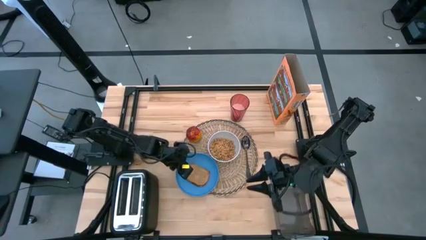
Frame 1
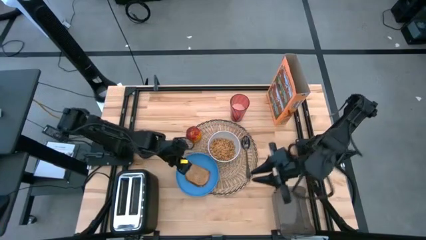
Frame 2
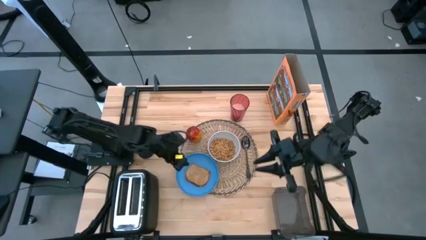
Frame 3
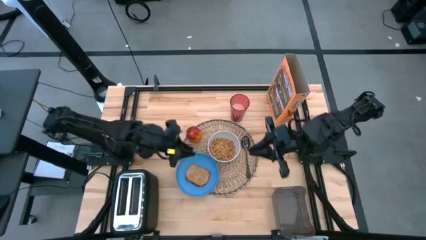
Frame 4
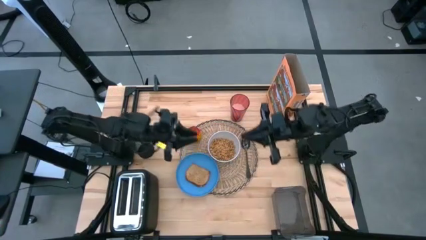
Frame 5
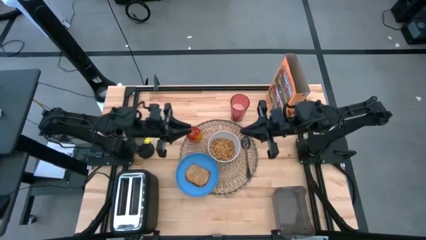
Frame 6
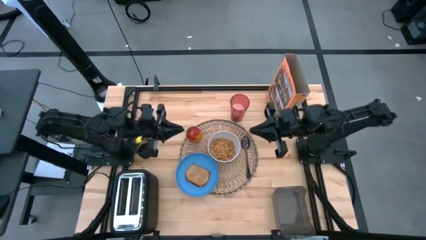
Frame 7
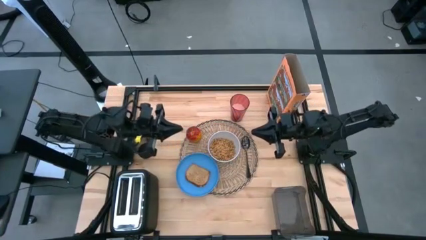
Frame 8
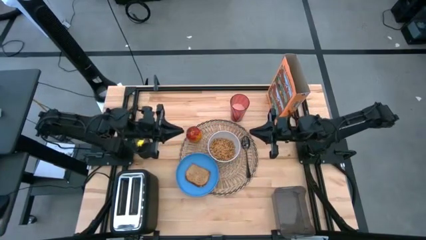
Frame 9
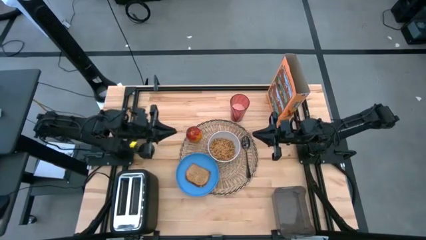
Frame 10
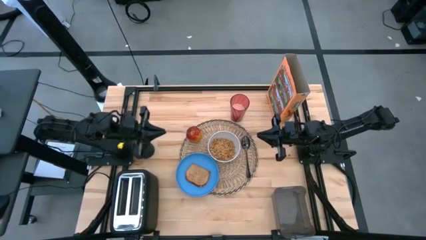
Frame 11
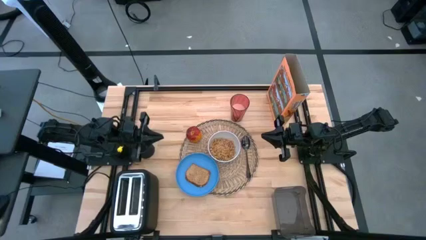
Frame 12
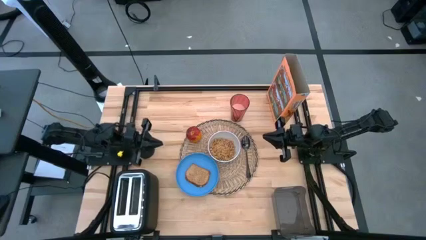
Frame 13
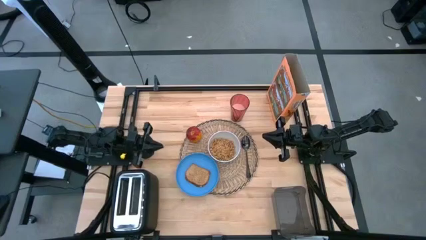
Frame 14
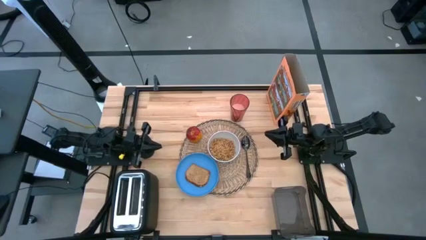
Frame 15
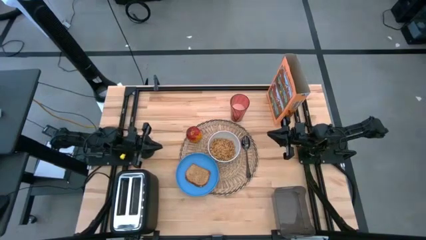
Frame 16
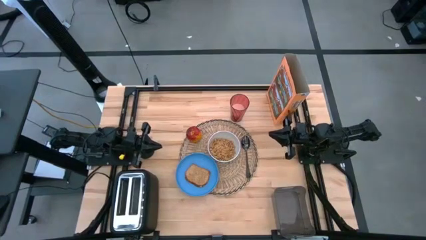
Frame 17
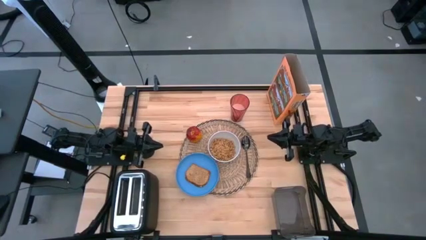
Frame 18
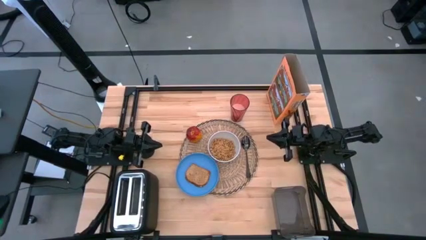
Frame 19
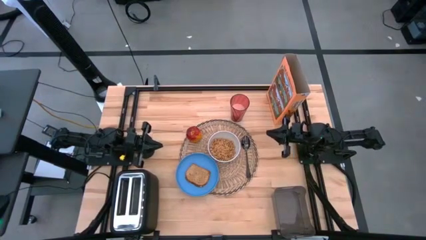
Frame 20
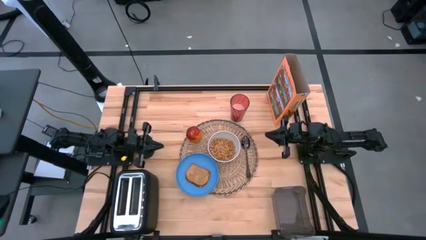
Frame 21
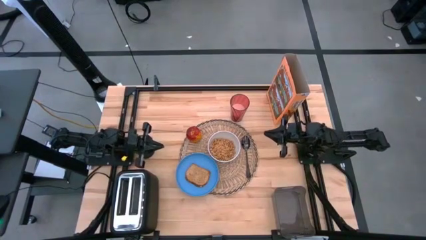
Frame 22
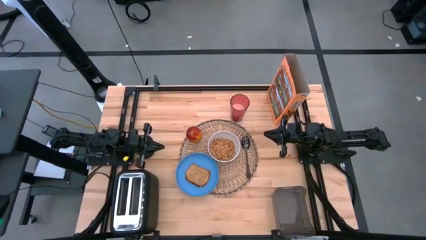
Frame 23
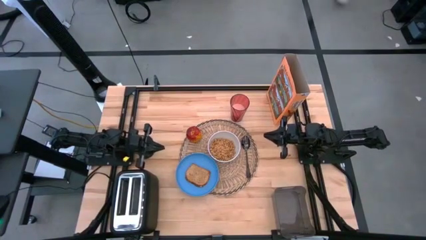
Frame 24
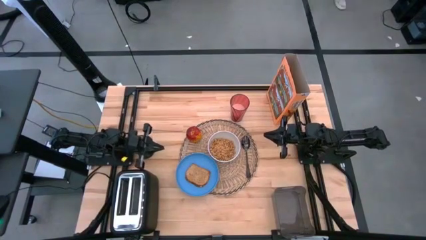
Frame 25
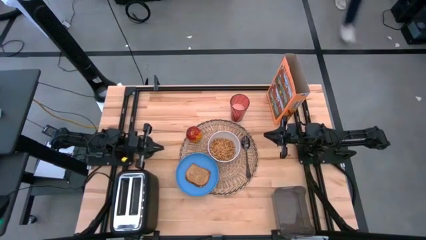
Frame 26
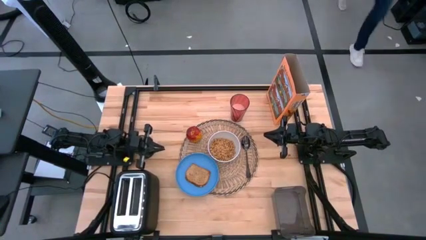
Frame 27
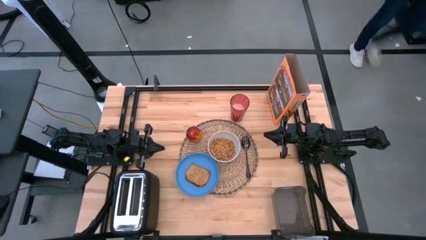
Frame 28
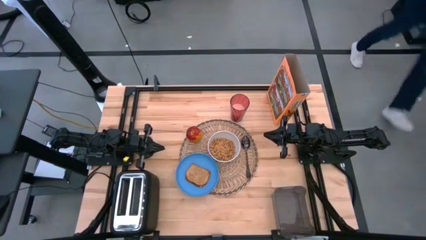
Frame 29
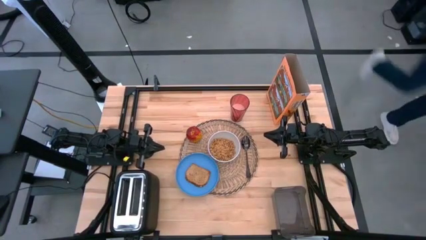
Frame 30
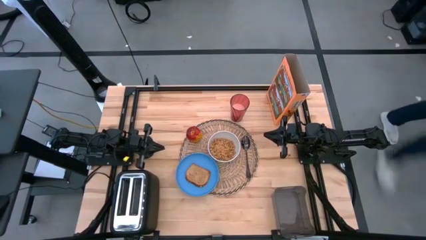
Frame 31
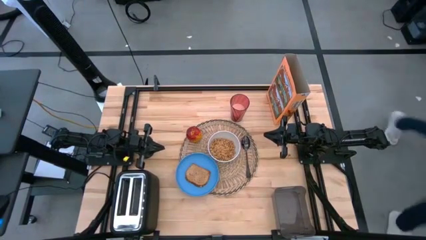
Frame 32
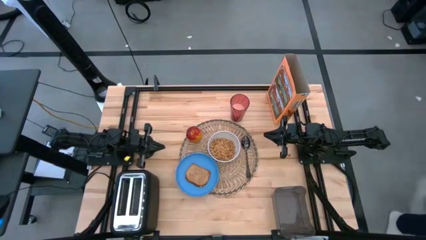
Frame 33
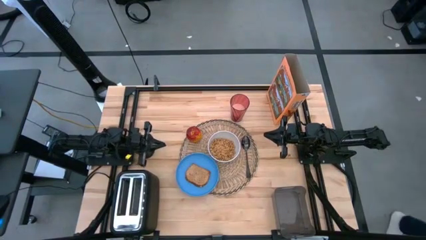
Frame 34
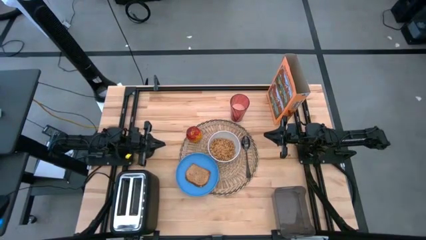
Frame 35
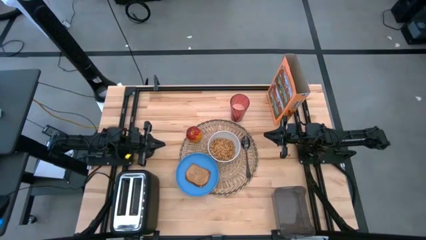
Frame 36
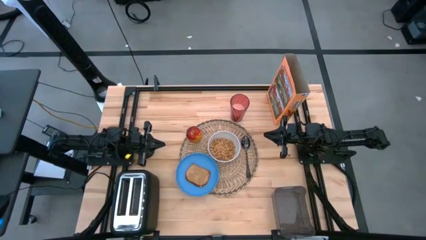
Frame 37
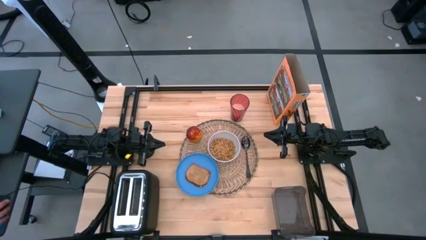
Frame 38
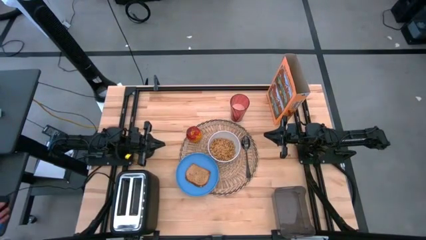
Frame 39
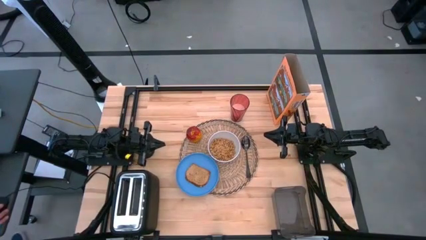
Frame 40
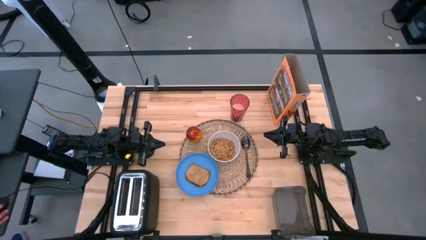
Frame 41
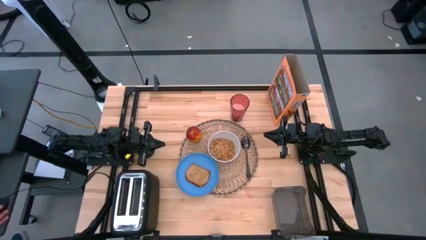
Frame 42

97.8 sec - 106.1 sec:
Task: Arrange a breakfast setting
Return to Home Position

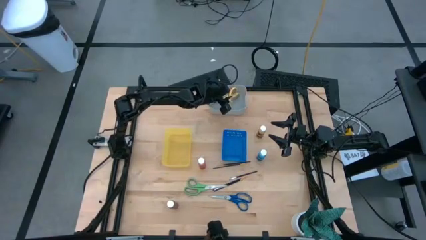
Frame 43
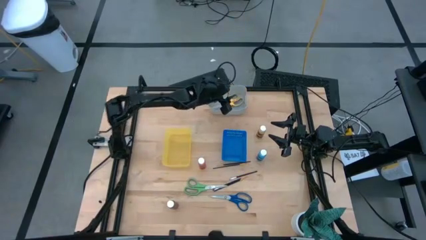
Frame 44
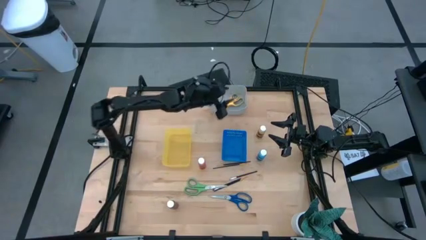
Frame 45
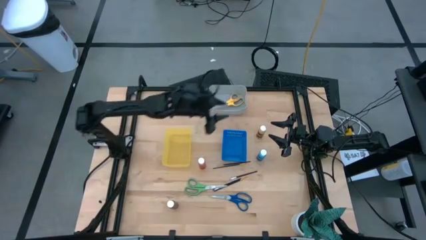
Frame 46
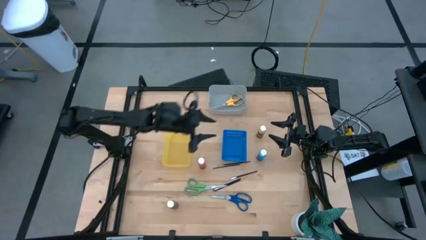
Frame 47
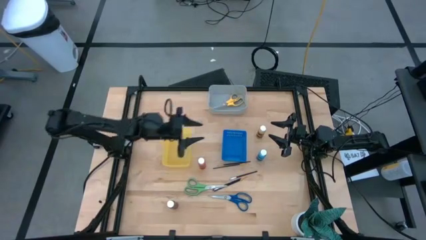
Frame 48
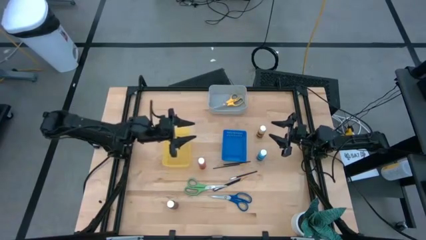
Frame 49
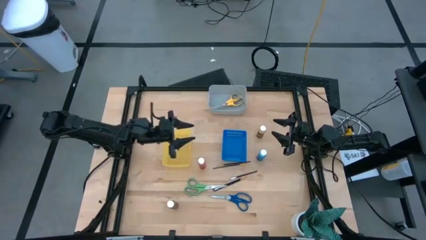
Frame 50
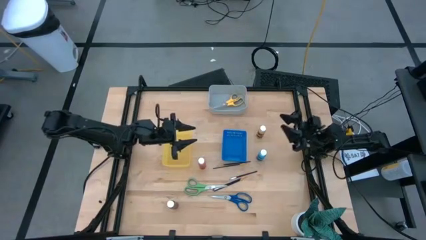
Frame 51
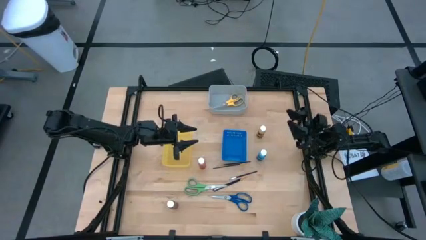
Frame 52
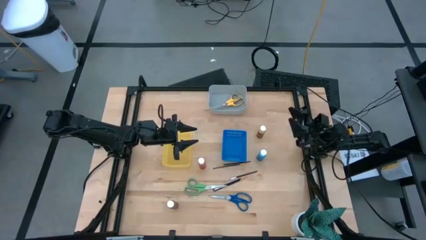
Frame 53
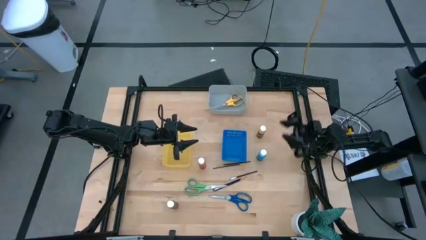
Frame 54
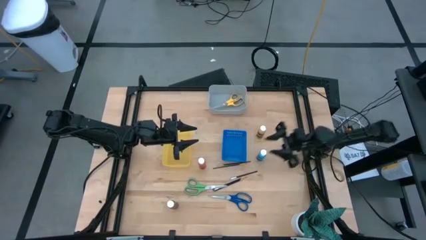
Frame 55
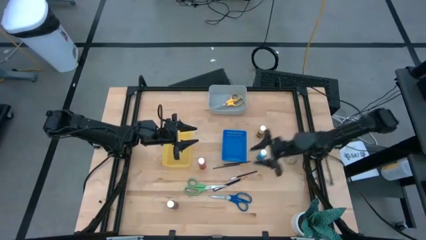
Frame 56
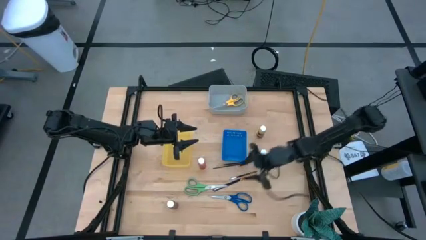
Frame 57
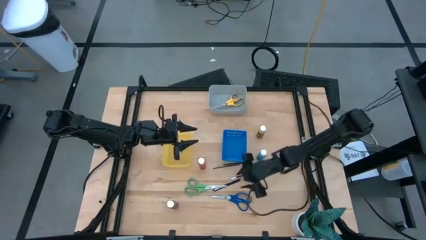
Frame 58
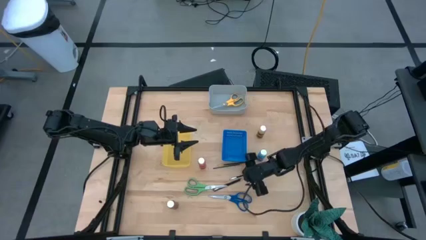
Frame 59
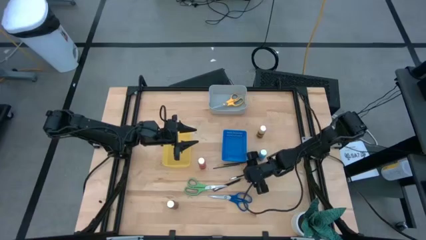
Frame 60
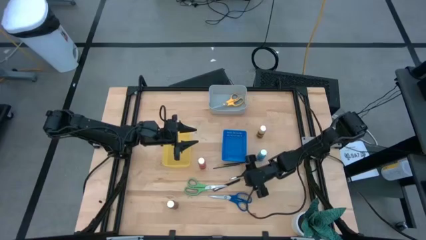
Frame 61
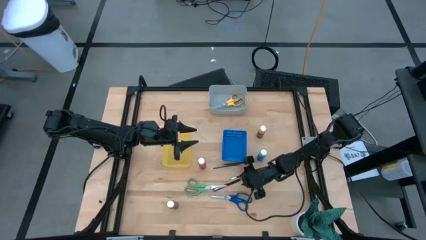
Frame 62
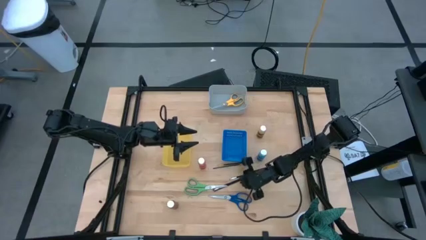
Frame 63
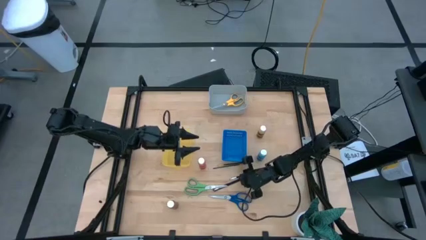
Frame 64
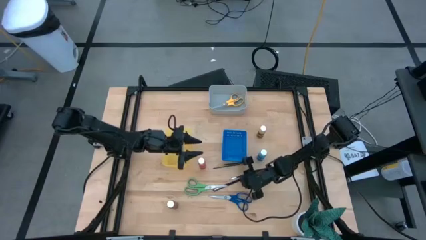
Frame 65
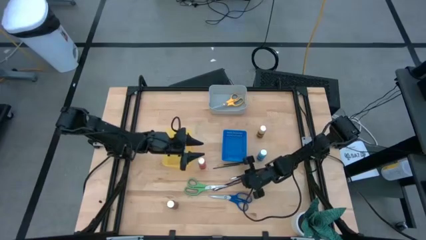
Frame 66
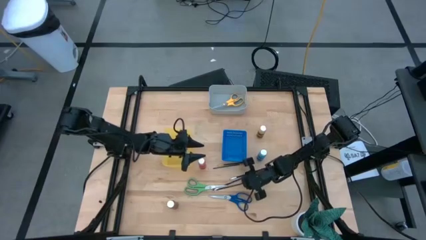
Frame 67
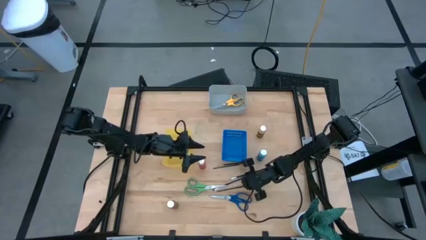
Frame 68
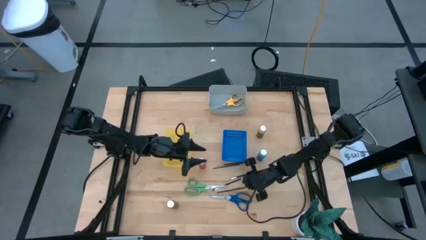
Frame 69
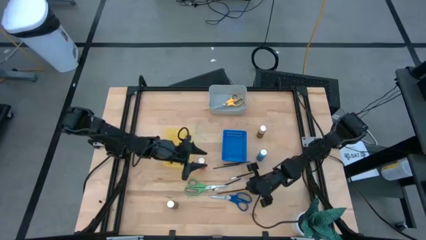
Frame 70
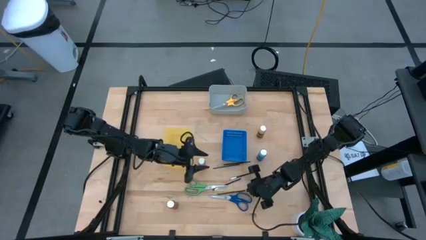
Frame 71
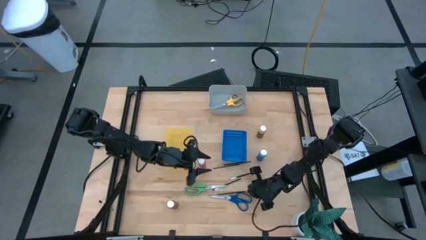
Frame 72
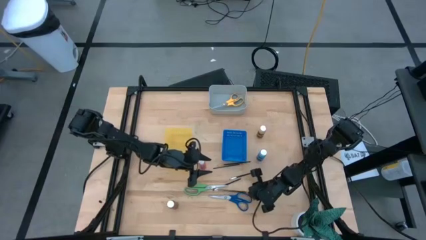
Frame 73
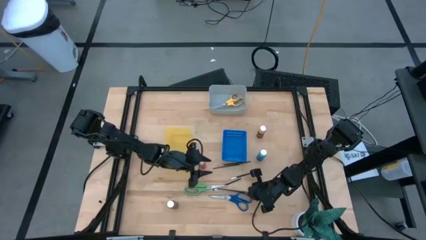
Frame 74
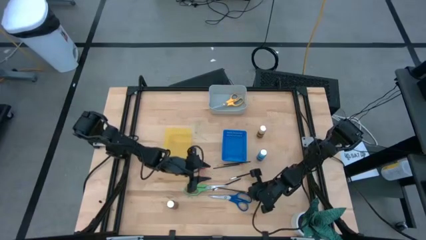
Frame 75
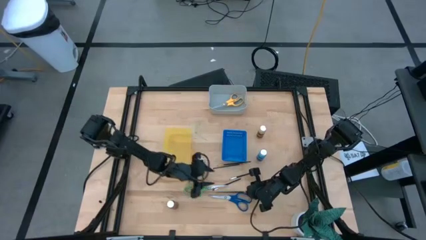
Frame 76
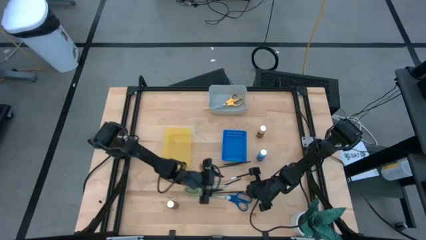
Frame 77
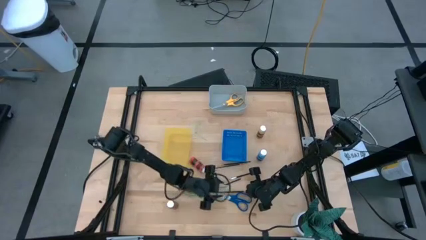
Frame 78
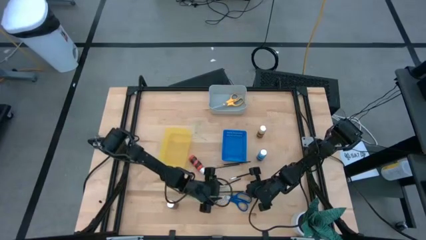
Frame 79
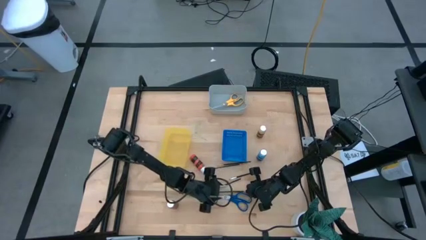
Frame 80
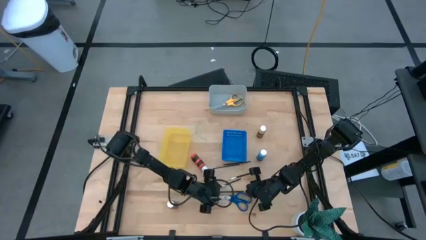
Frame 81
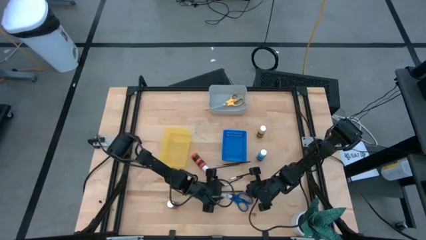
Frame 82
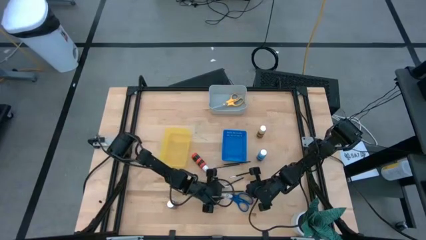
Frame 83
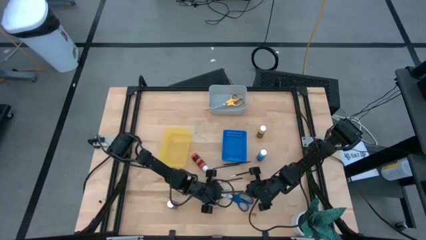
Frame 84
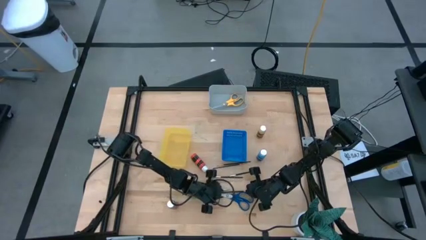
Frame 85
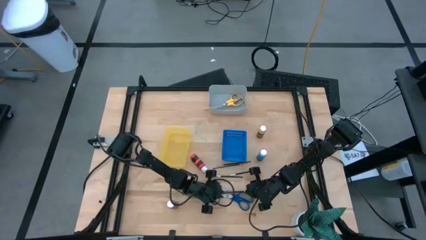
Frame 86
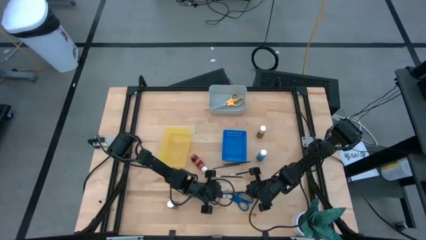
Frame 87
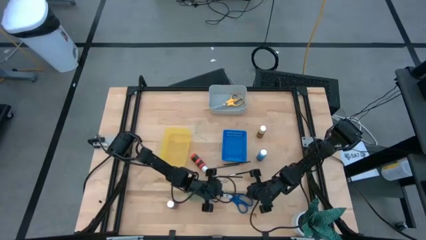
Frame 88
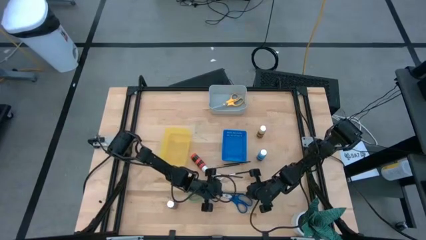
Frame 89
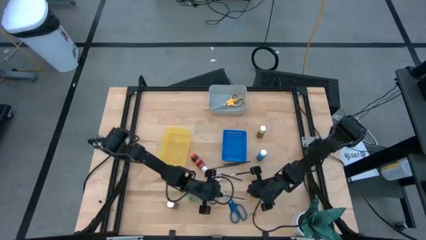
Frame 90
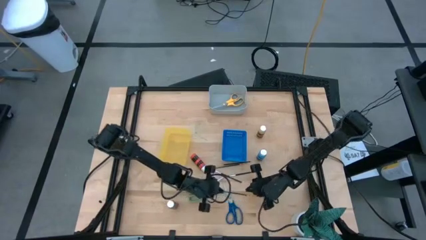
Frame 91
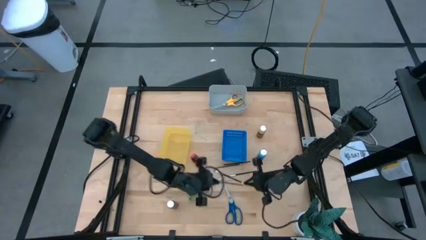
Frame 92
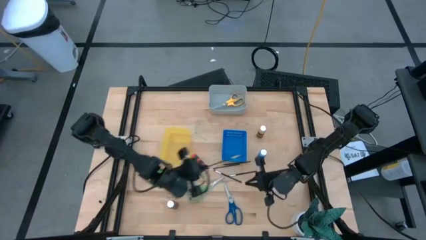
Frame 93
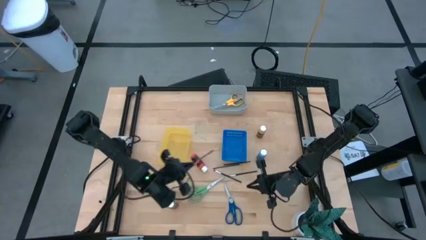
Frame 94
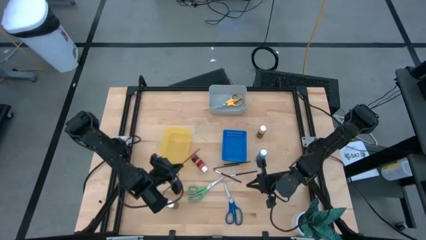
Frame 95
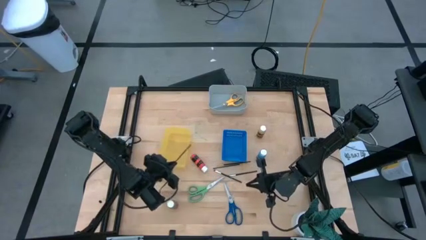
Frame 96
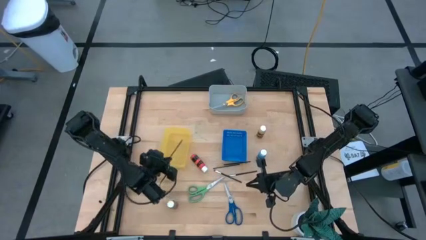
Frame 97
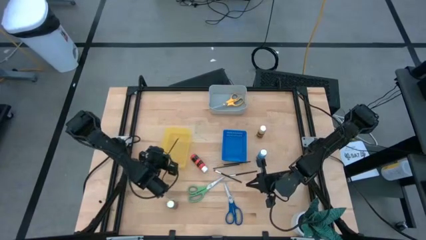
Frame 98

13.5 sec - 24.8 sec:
Task: Pick & Place Paint Supplies
Put the bottom gold paint brush into the yellow bin
